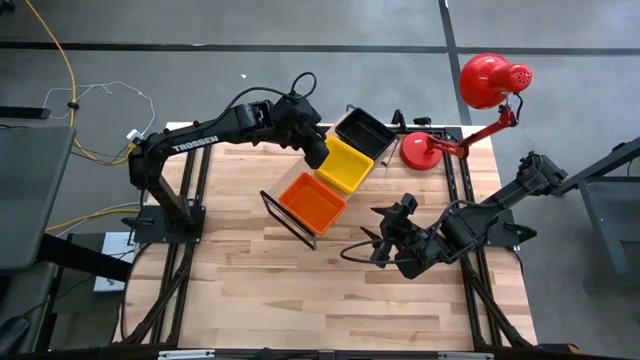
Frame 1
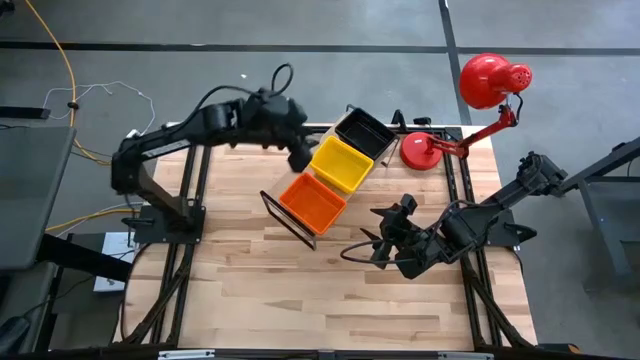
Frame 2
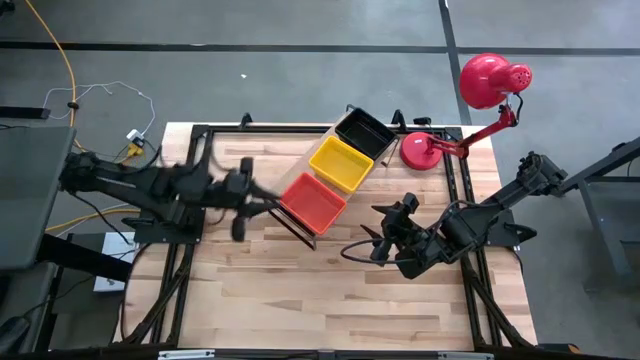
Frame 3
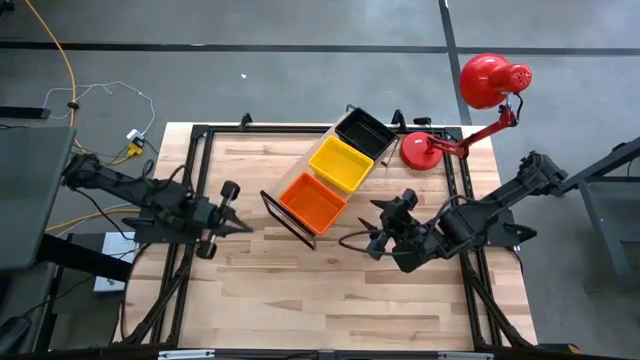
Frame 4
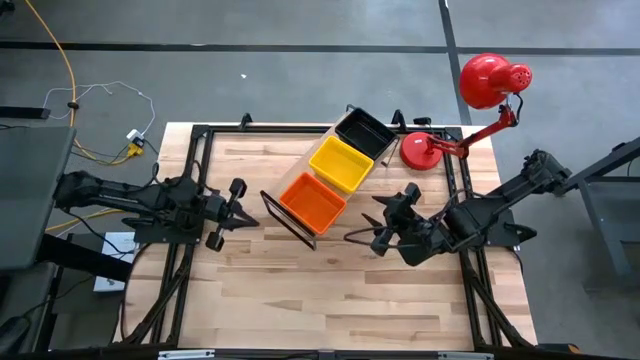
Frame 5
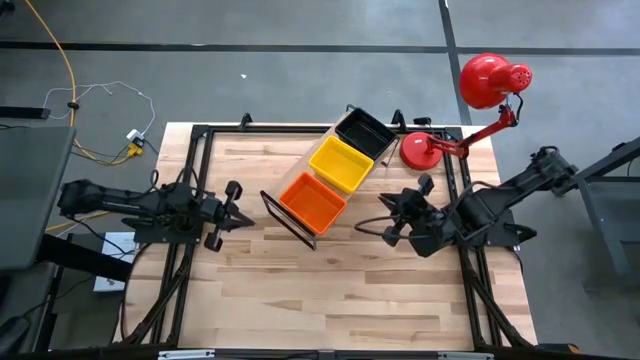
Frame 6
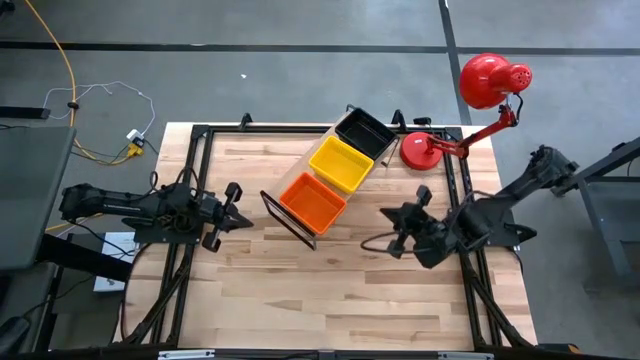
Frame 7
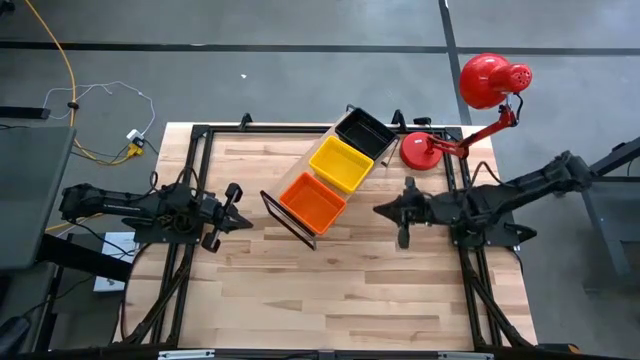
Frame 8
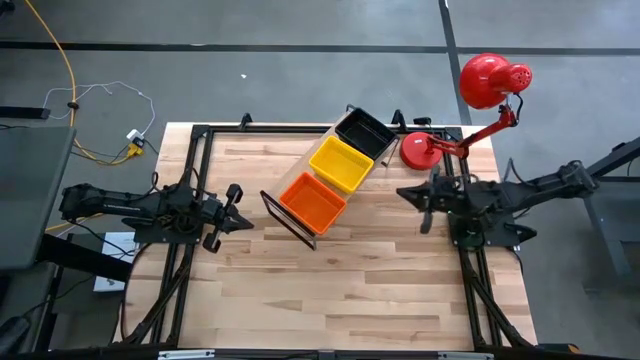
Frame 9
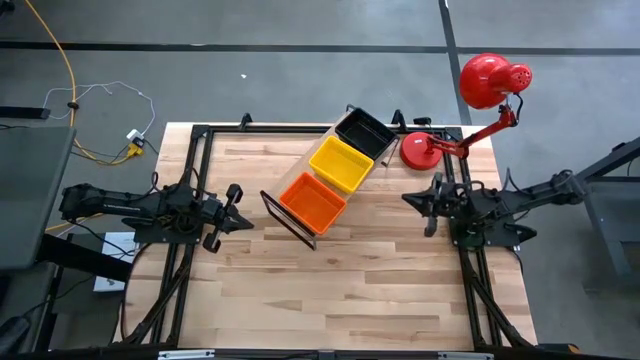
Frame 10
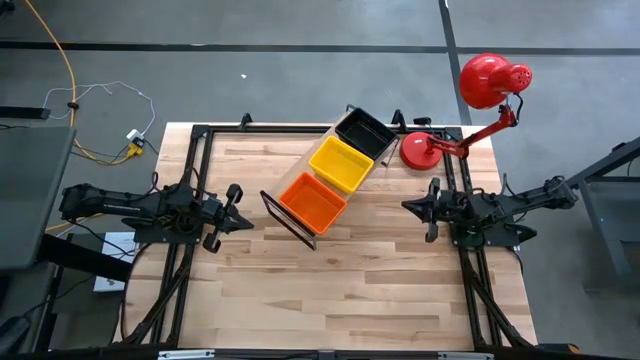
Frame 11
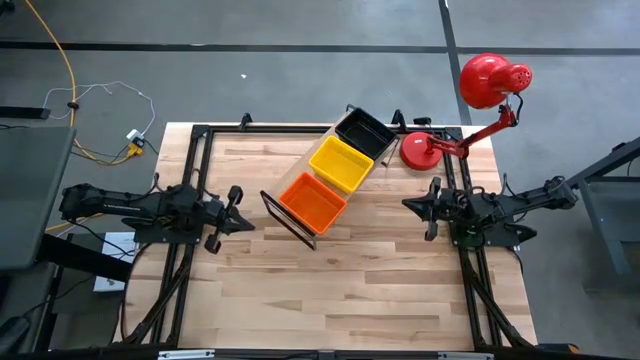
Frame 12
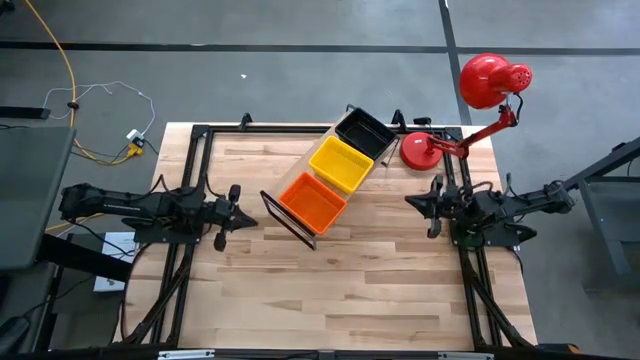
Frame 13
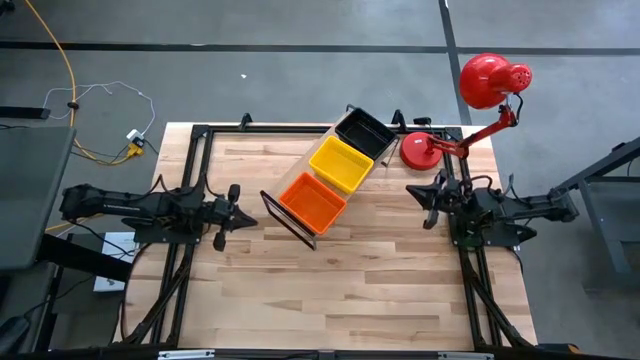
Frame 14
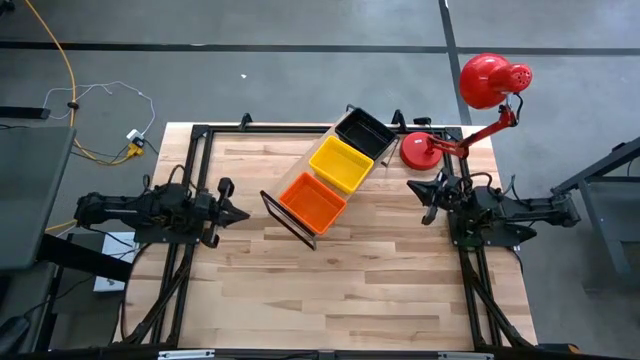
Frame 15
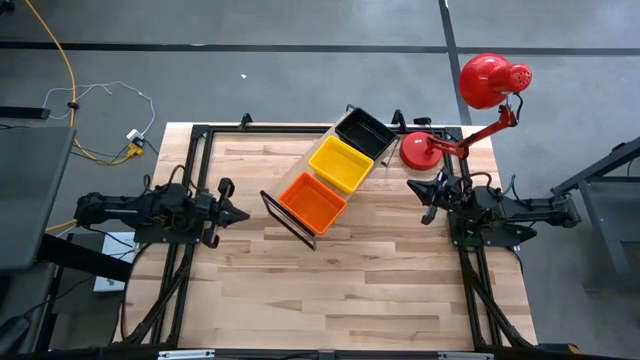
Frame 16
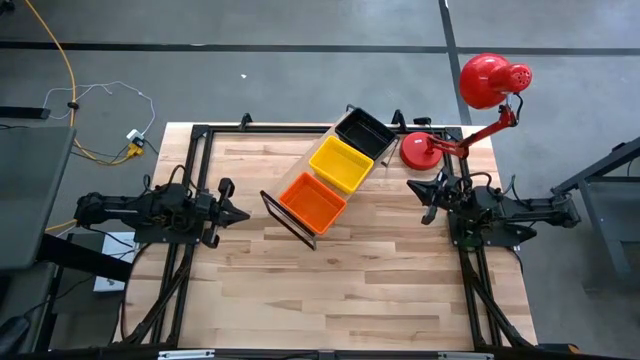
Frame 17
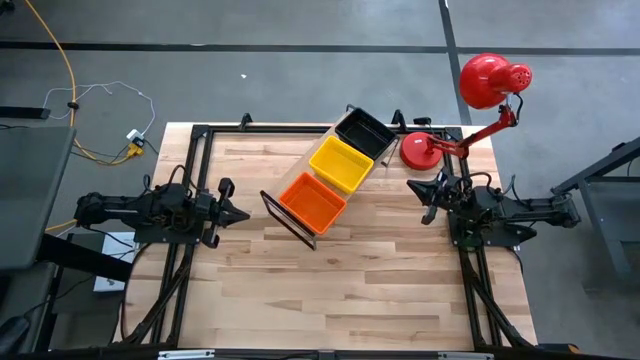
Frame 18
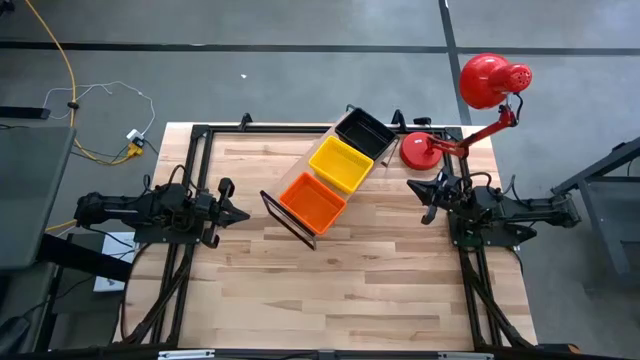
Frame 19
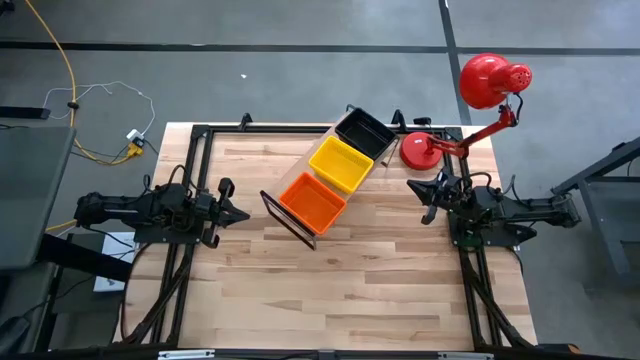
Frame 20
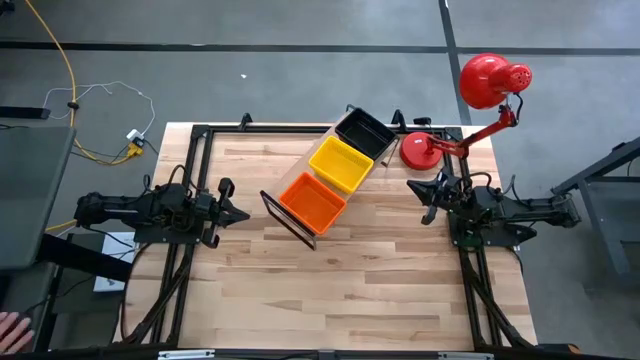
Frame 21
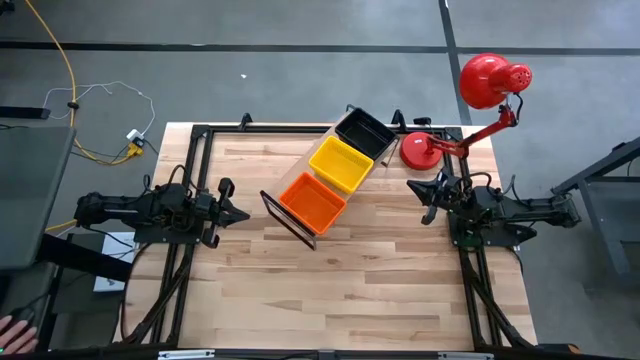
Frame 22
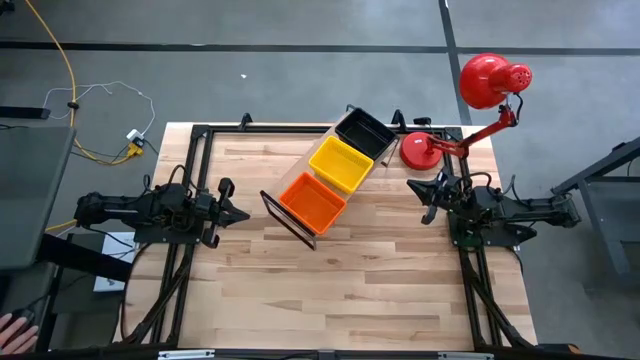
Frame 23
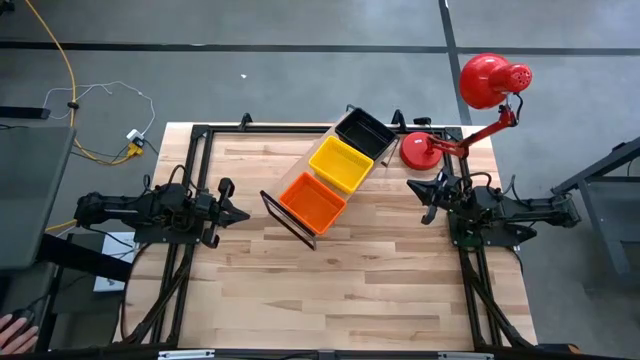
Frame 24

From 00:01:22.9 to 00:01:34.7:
Task: Stack baskets on shelf by color
Return to Home Position

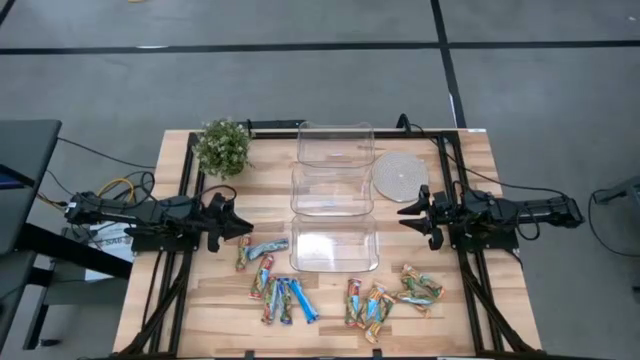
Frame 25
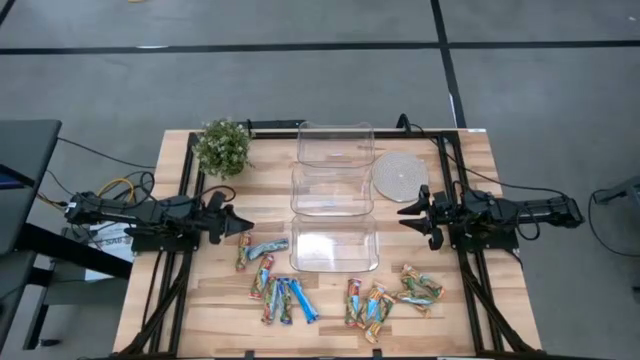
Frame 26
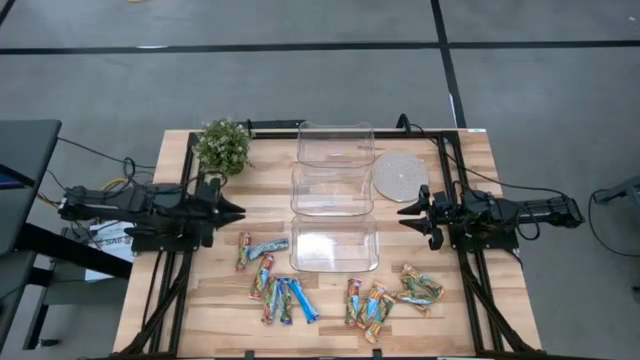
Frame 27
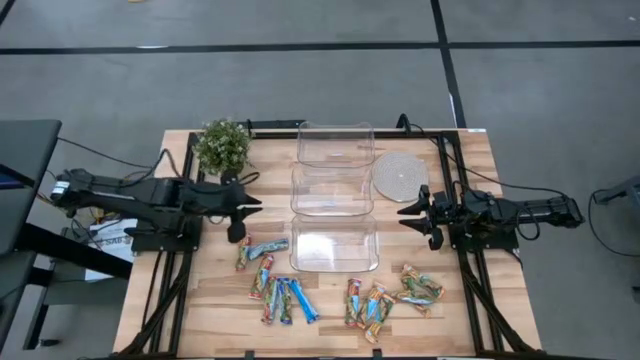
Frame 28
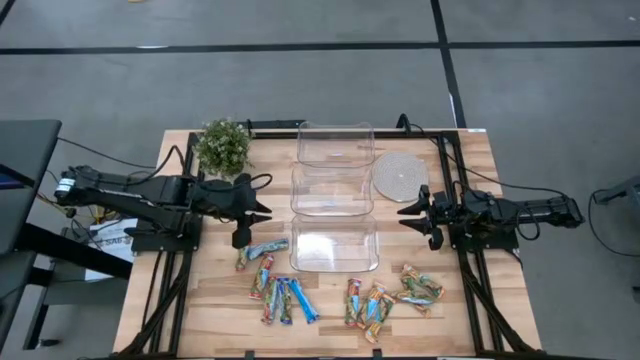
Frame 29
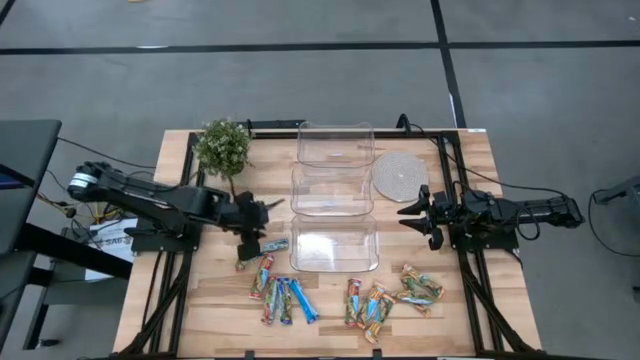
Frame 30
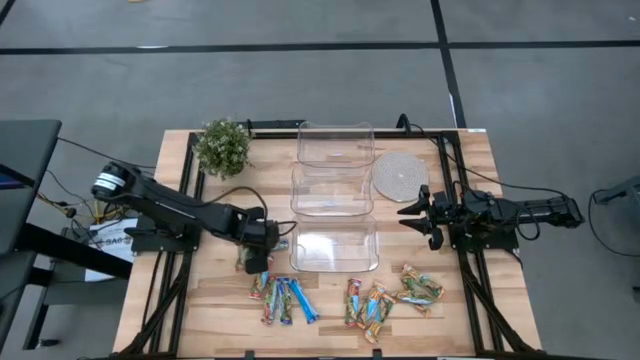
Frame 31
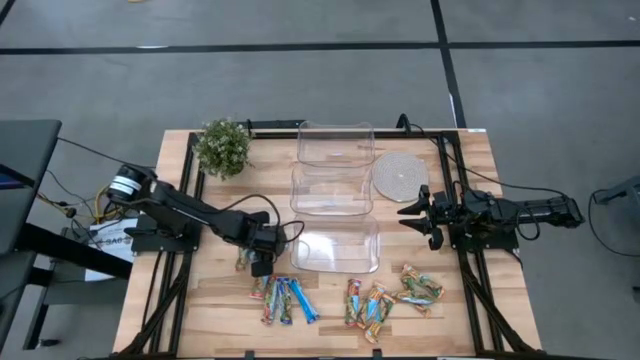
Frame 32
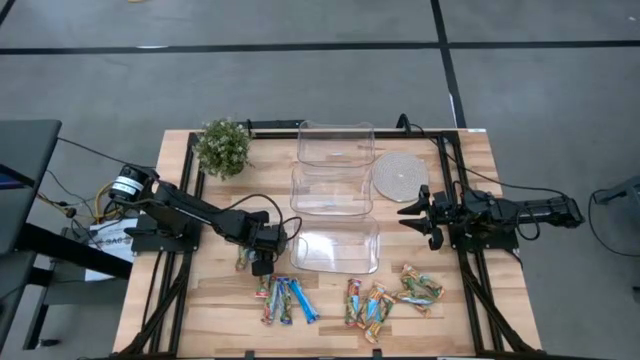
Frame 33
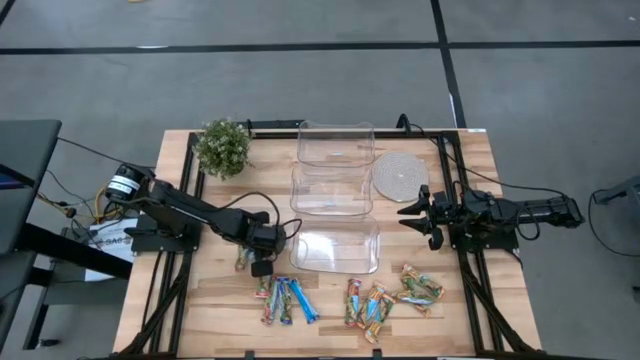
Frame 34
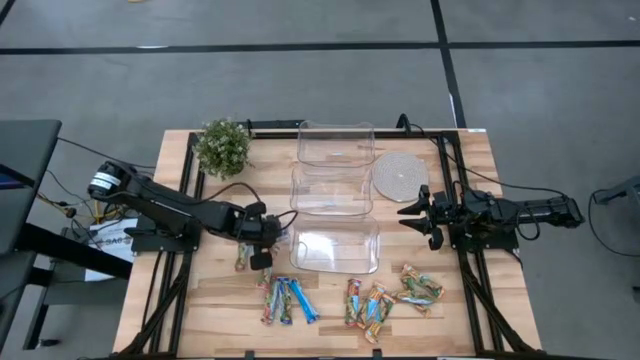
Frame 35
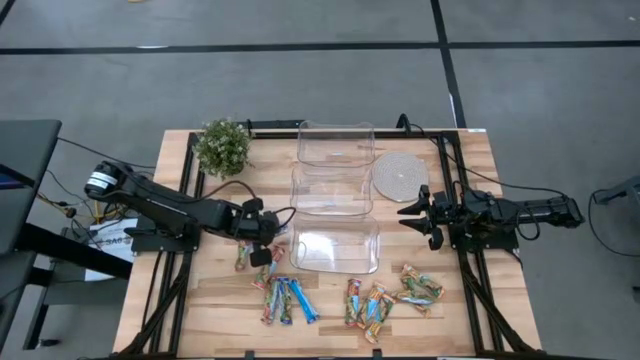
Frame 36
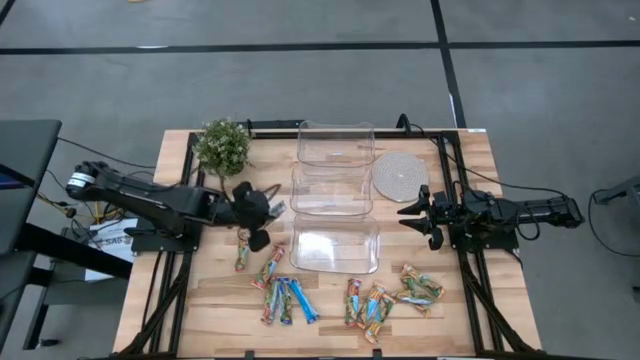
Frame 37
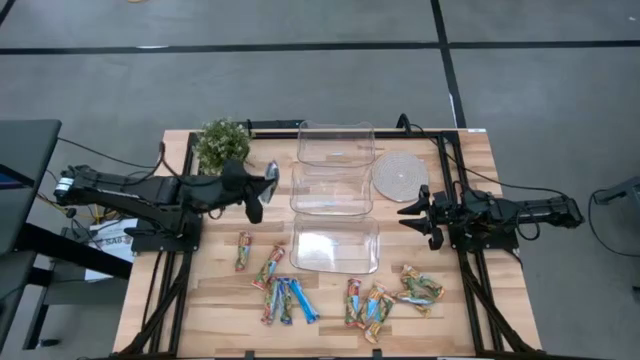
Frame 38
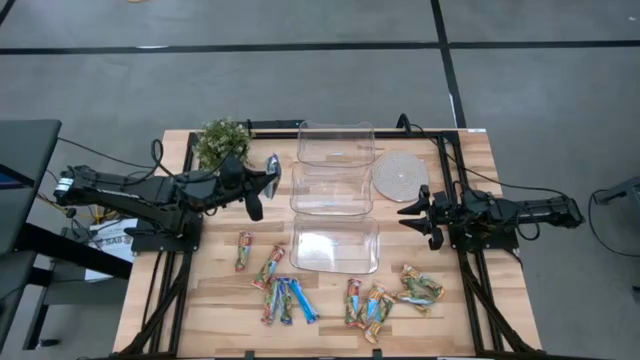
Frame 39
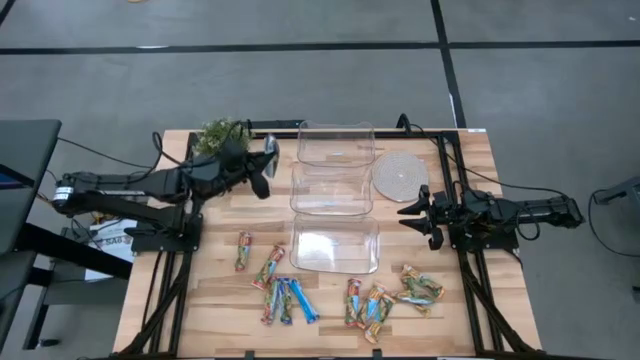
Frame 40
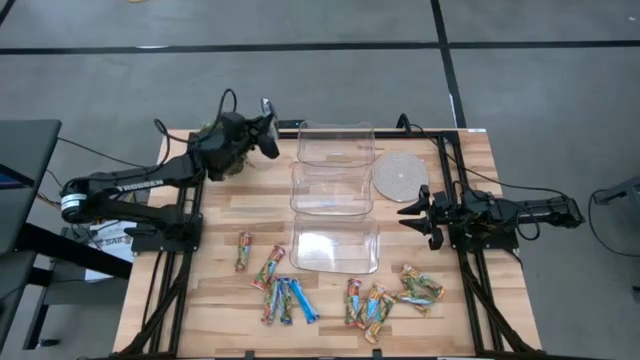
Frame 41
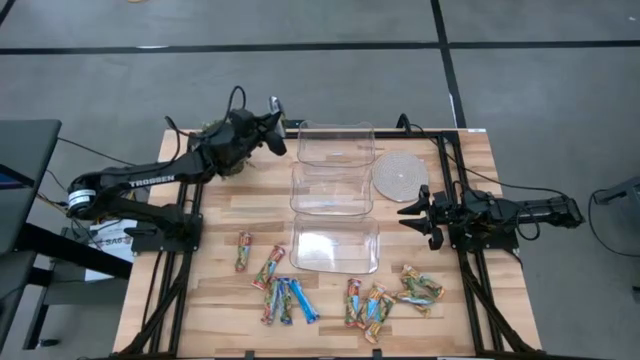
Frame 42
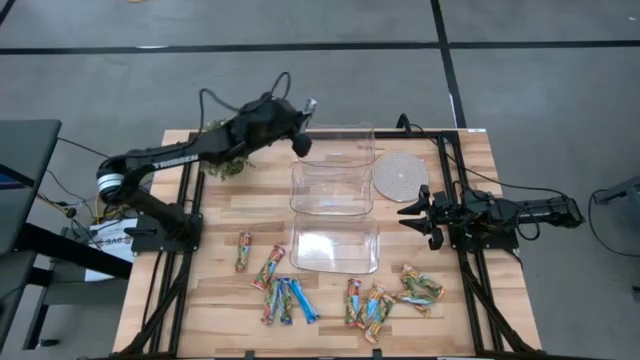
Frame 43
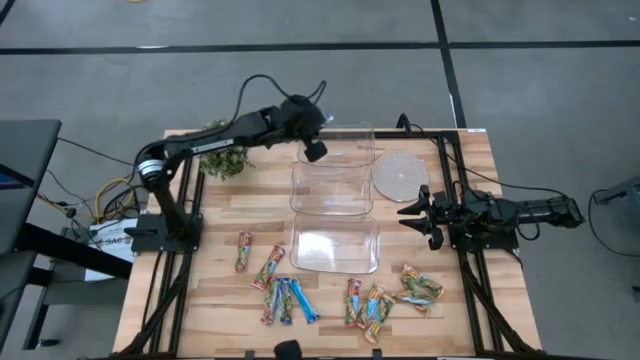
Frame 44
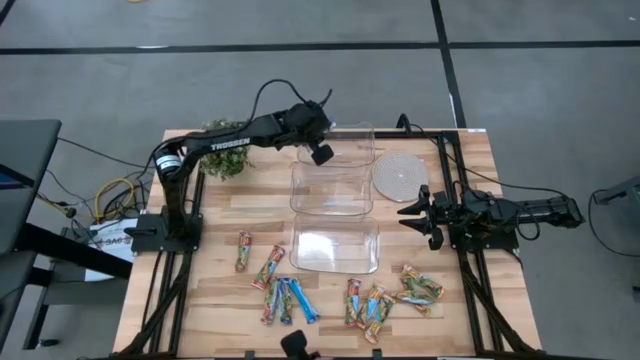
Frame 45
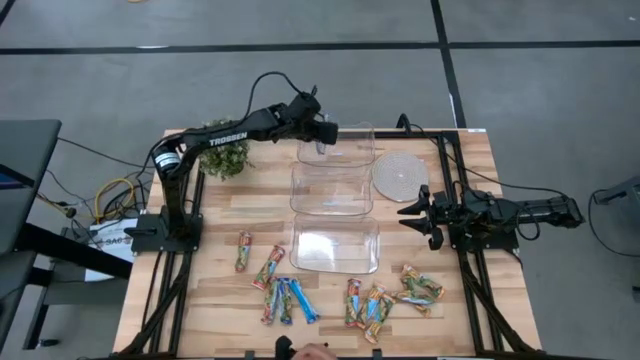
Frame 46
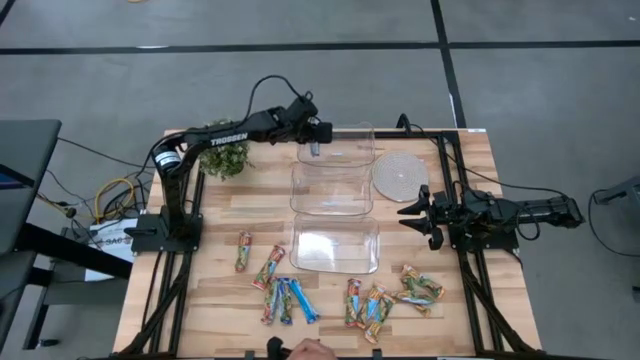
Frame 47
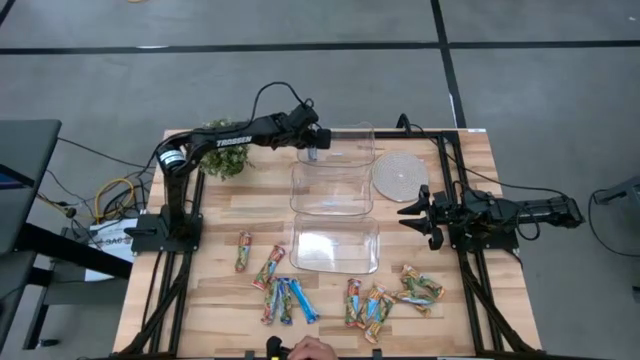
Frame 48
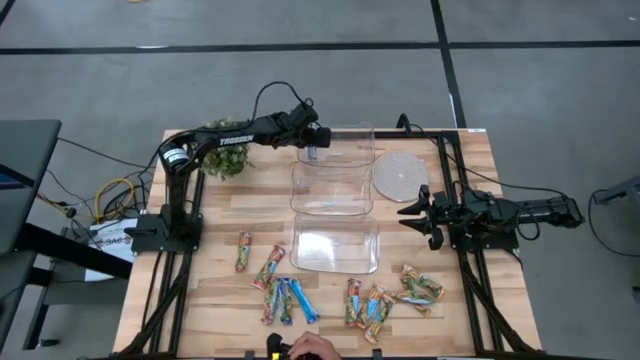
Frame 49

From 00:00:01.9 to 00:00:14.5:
Task: Pick and place Granola Bars by type
Put the blue granola bar into the top transparent bin
